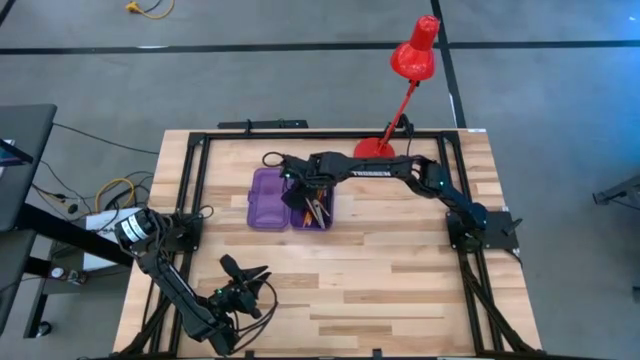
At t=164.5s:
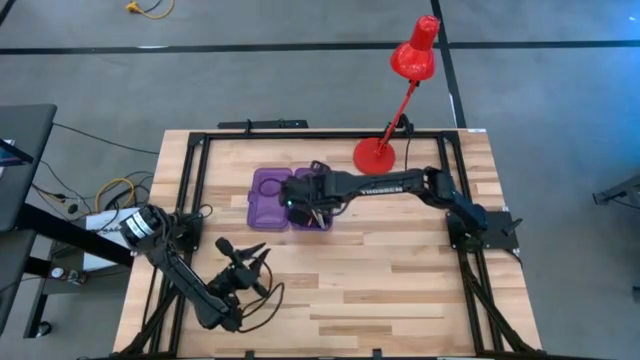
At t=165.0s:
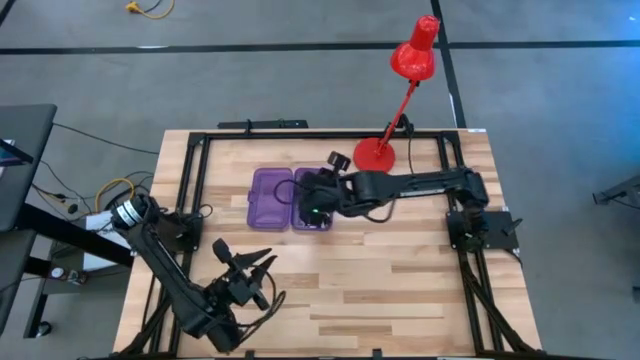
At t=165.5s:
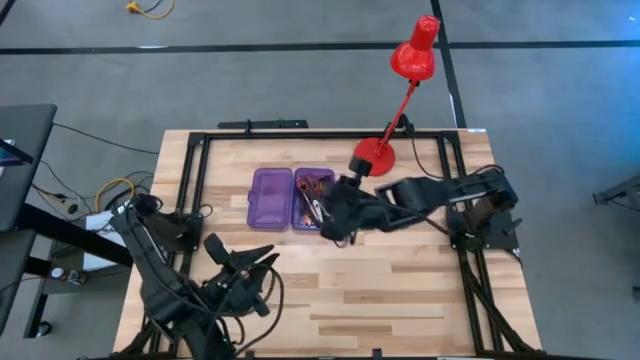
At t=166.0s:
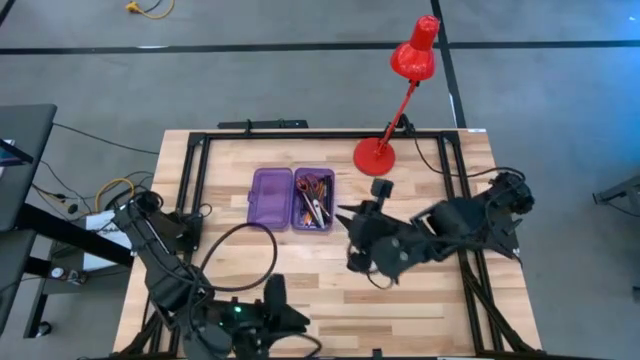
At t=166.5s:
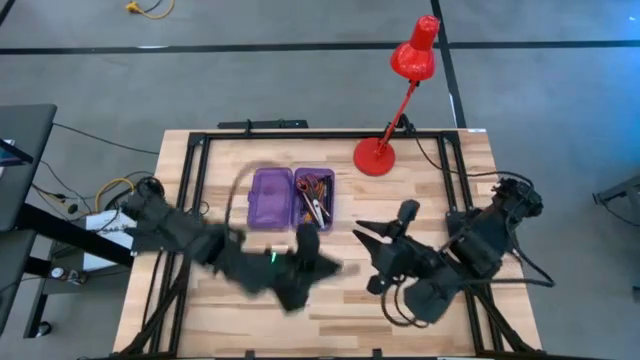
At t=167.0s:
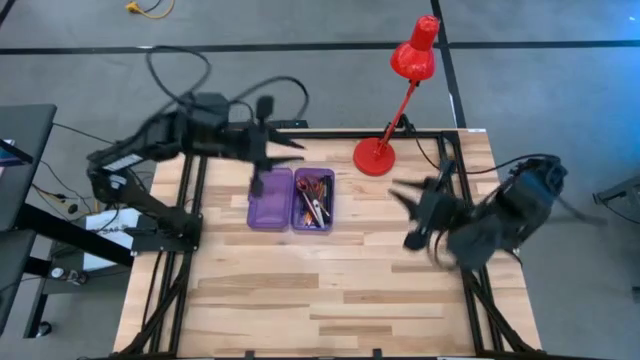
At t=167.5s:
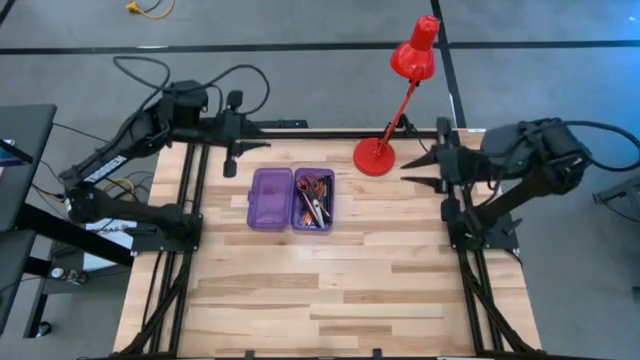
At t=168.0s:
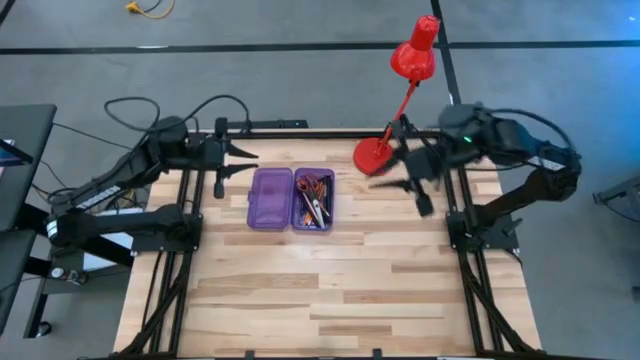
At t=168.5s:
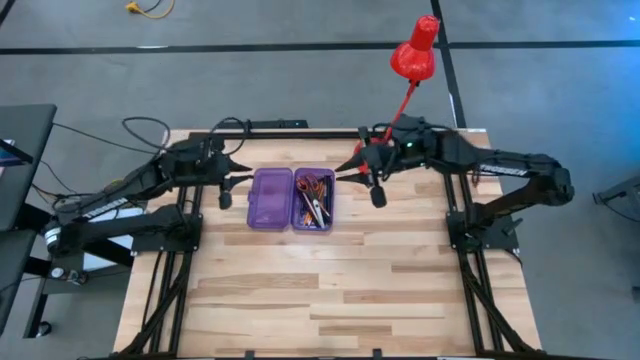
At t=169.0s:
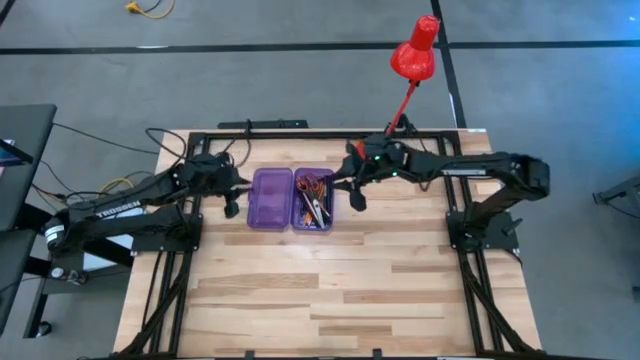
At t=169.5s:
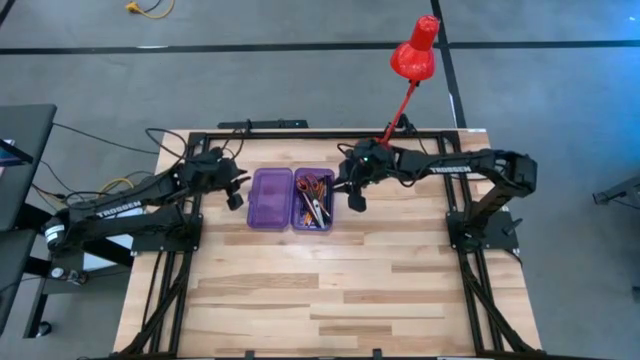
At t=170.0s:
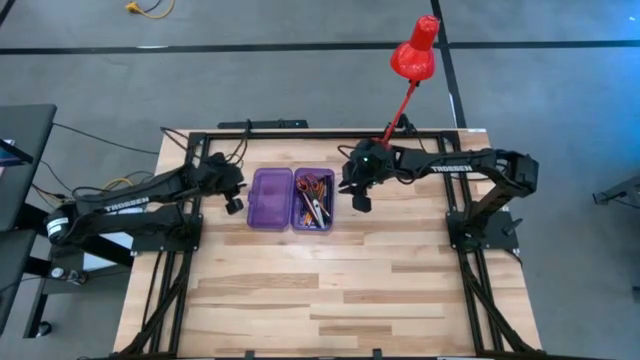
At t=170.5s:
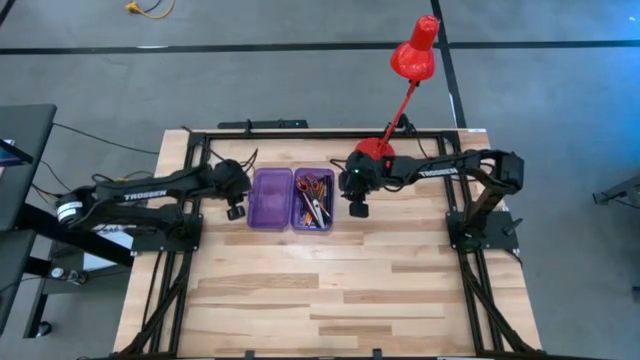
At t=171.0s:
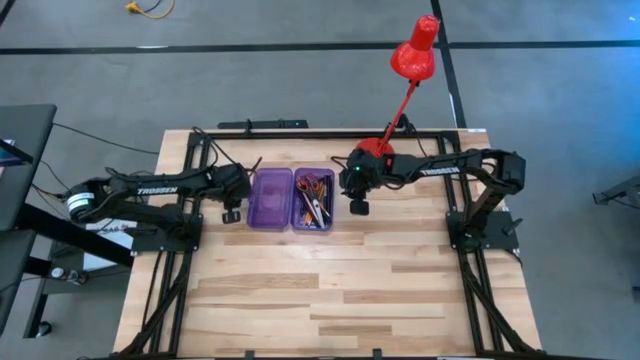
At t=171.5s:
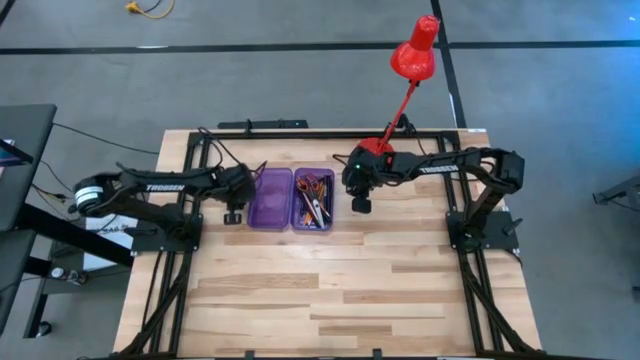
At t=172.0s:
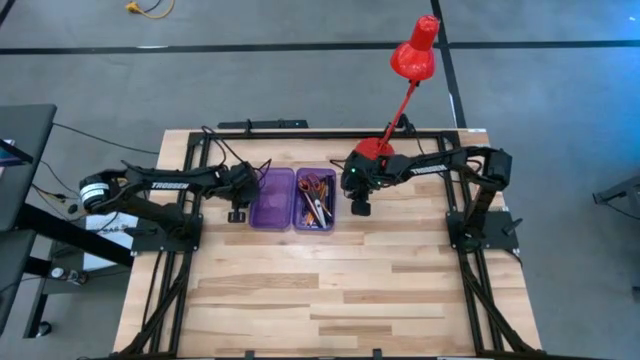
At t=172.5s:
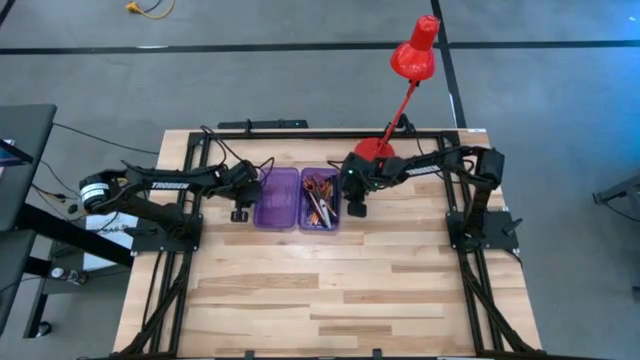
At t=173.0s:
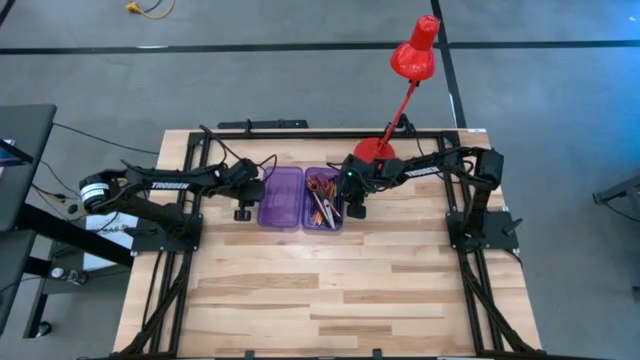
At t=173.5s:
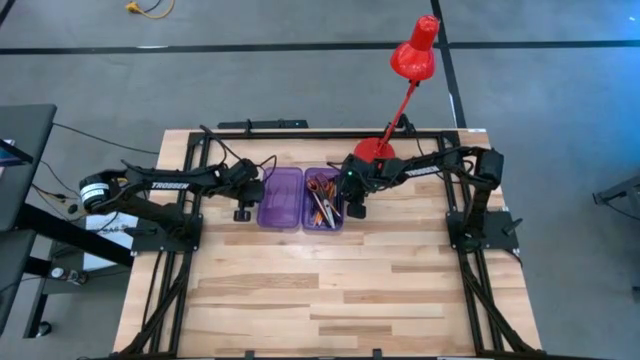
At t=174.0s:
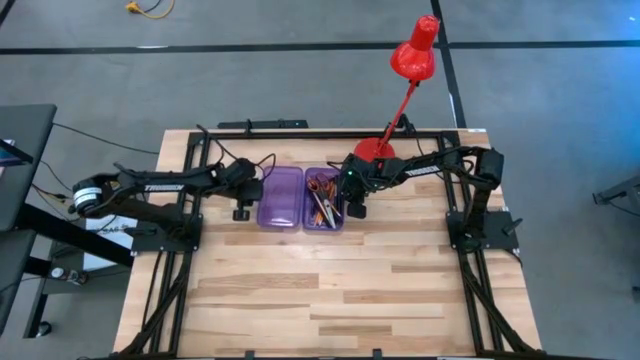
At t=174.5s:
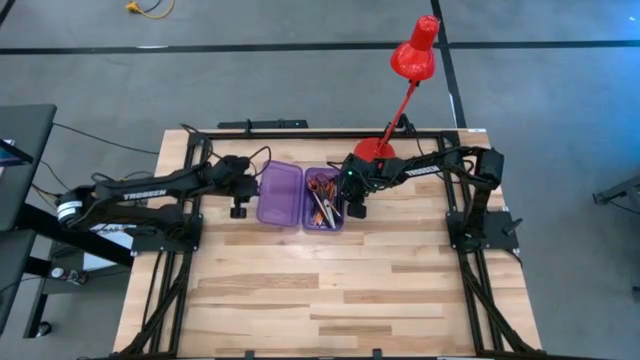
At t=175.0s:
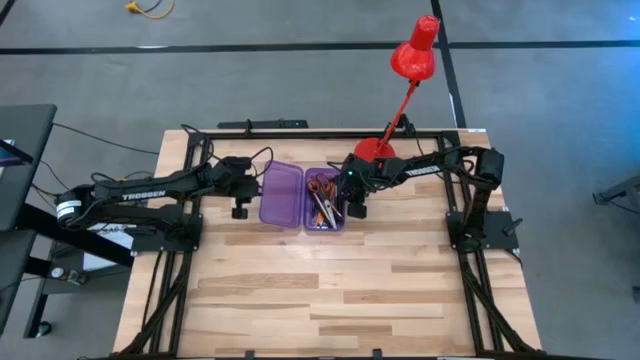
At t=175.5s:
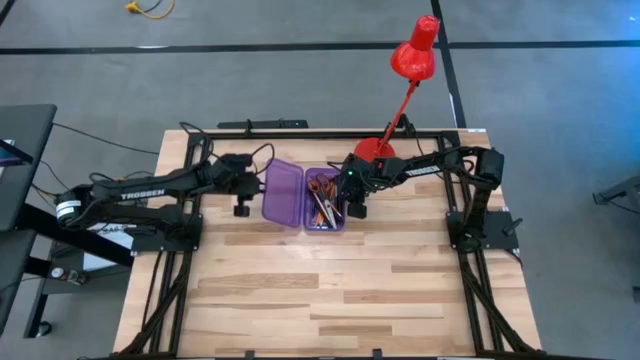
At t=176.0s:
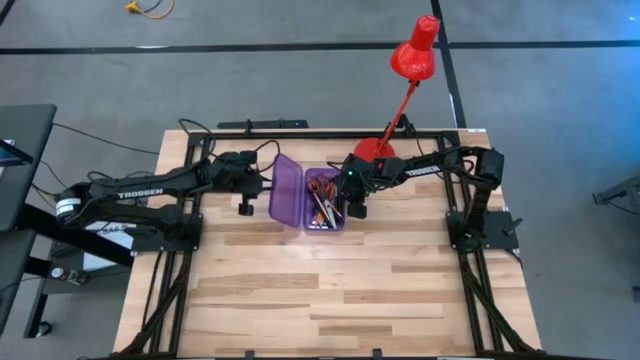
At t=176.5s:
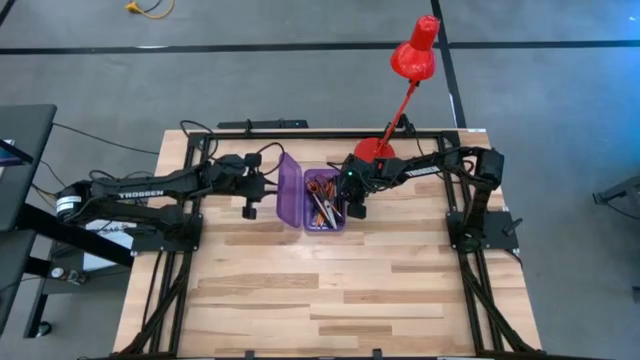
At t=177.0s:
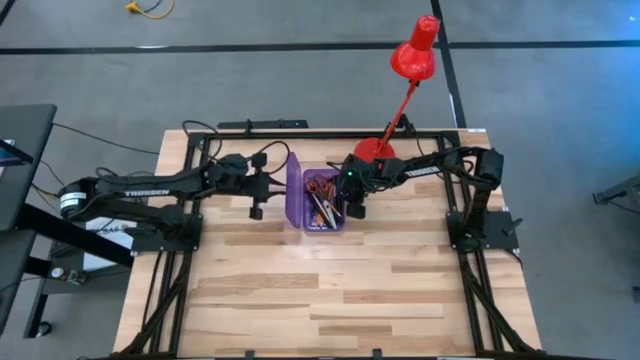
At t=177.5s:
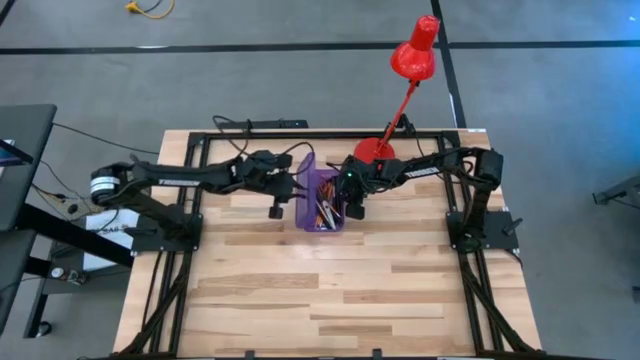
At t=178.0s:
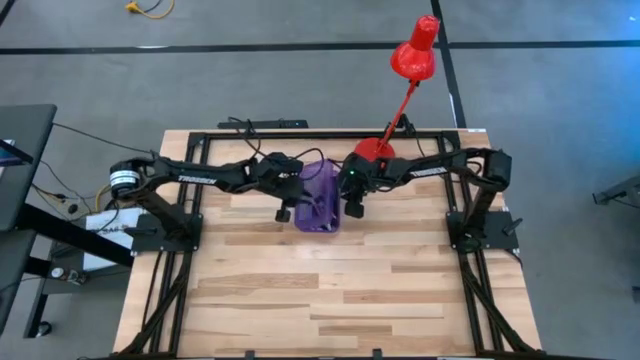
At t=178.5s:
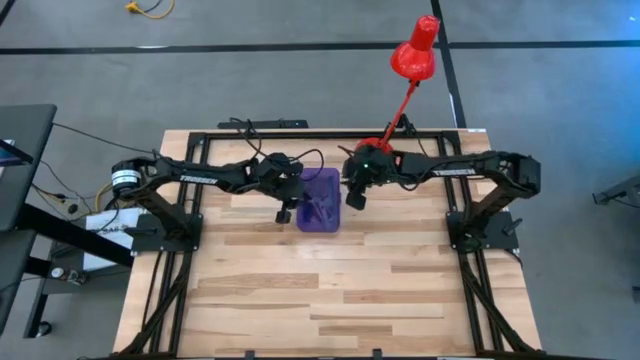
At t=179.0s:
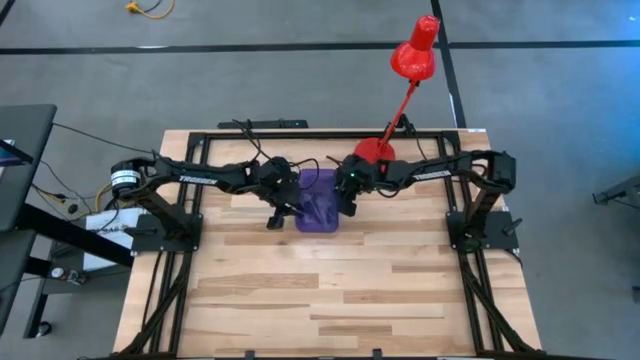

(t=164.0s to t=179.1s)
Task: Pick & place school supplies into a supply box
Close the violet supply box

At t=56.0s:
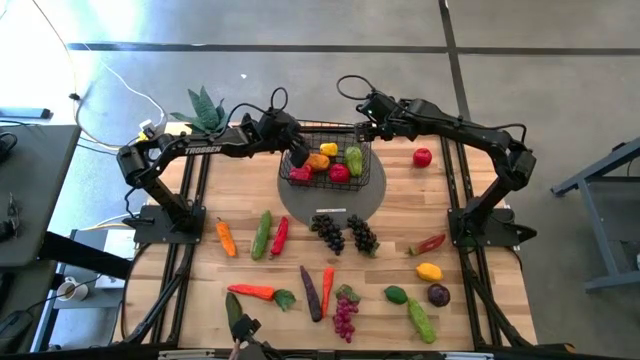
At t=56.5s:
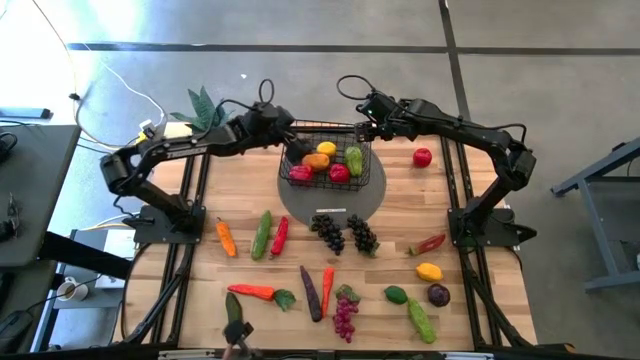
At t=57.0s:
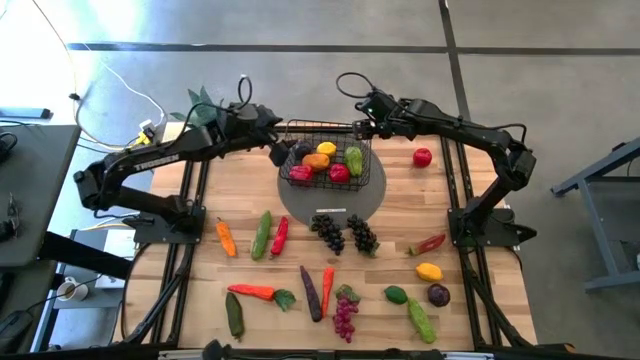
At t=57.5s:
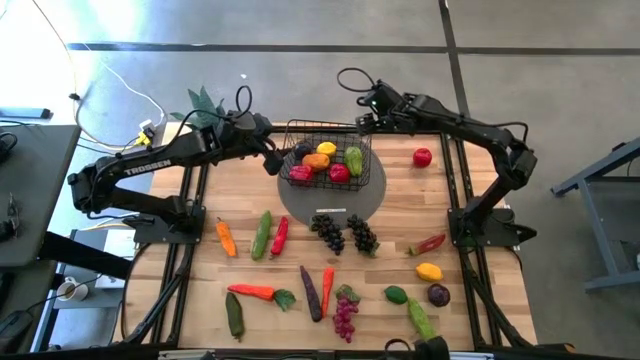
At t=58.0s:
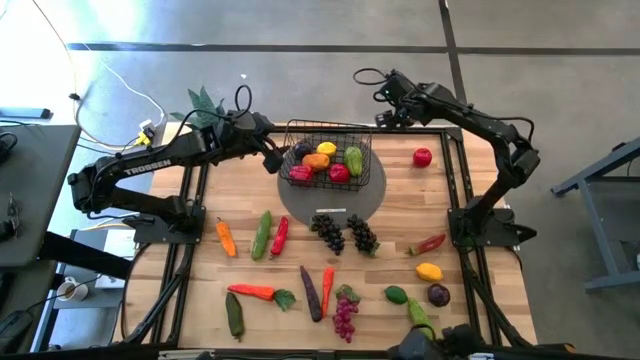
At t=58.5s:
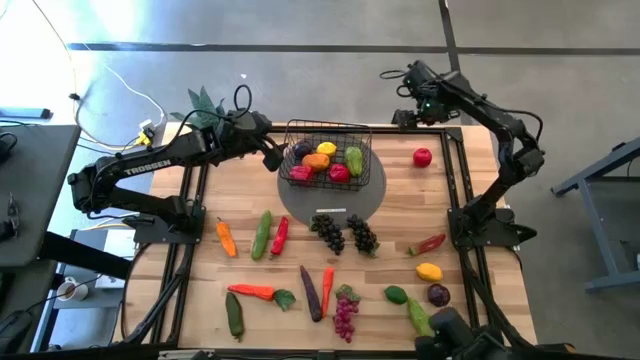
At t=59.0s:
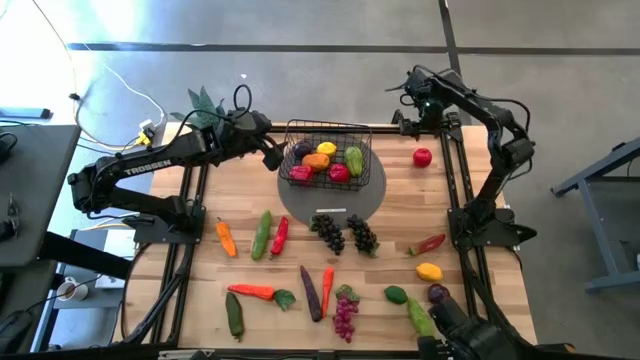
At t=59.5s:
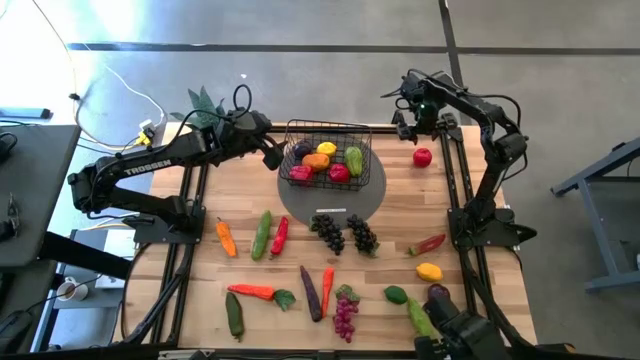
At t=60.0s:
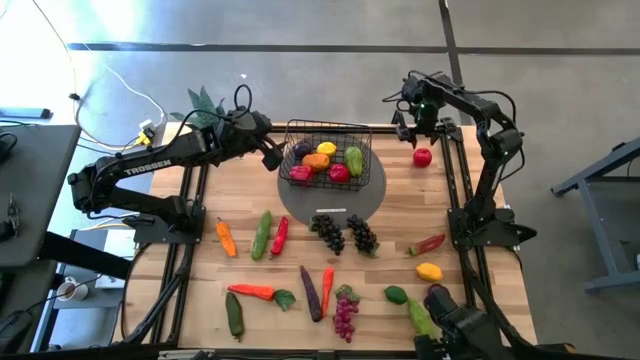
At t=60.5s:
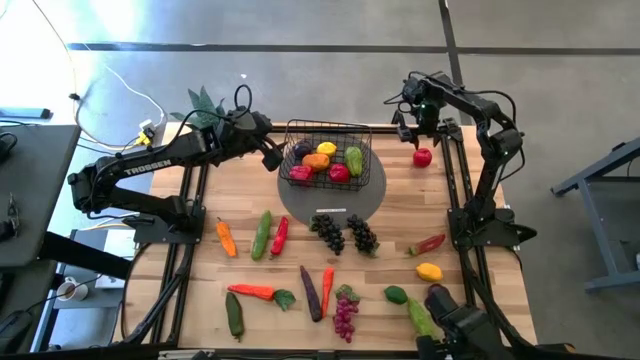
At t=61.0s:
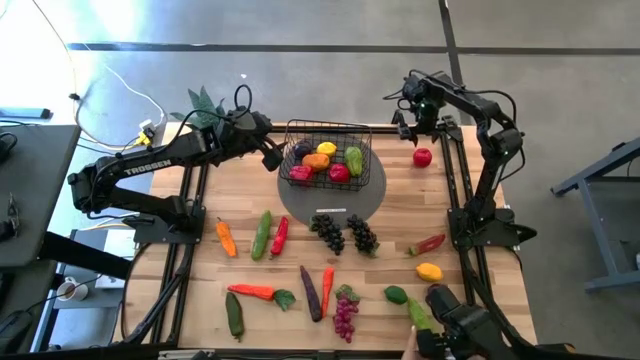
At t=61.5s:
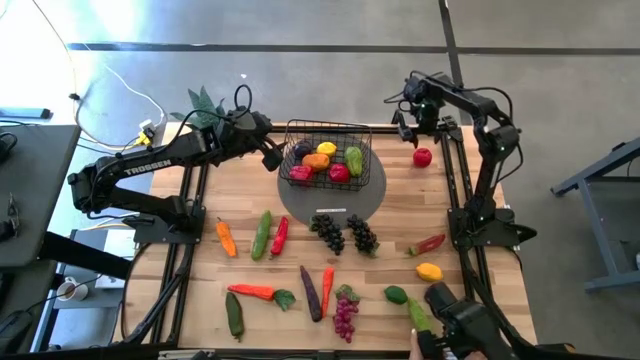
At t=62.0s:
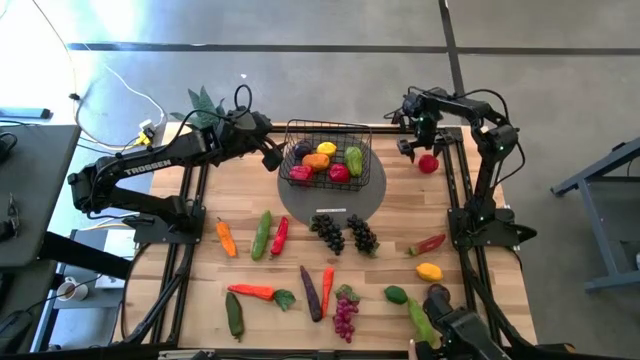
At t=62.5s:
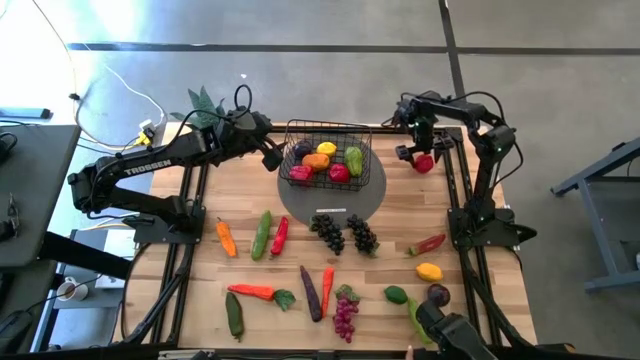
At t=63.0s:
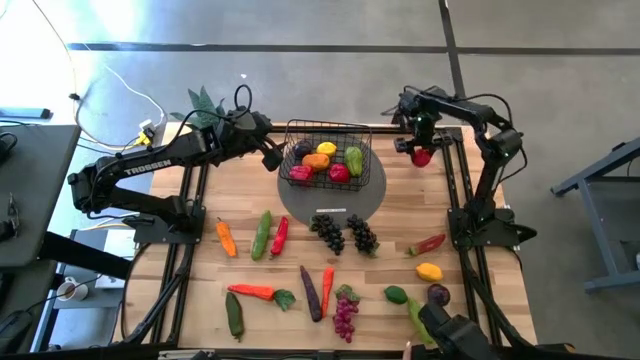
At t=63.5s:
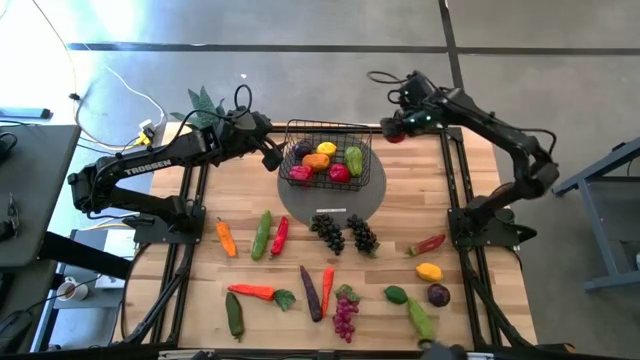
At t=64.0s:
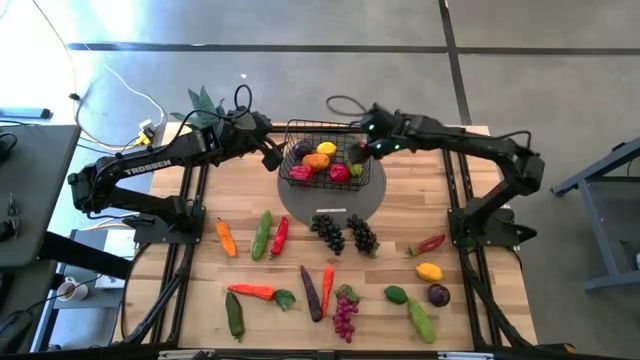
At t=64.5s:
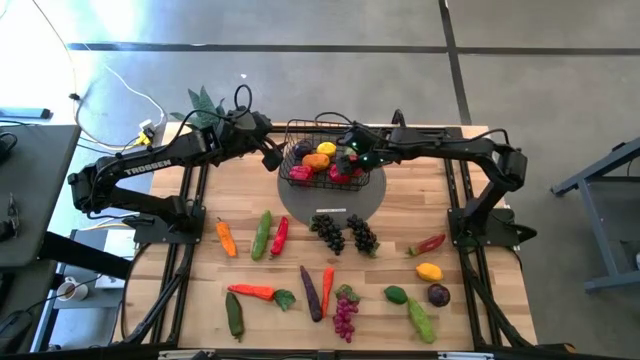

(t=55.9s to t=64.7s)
Task: Build produce basket
Put the red tomato into the wire basket
